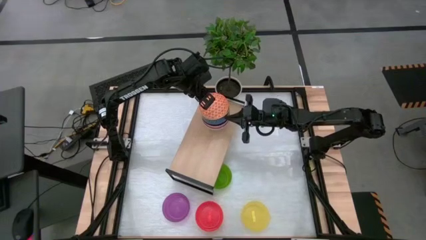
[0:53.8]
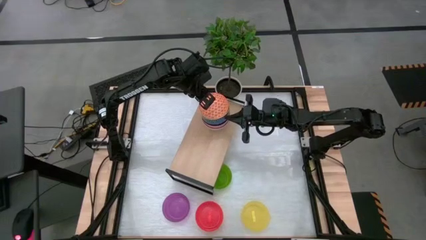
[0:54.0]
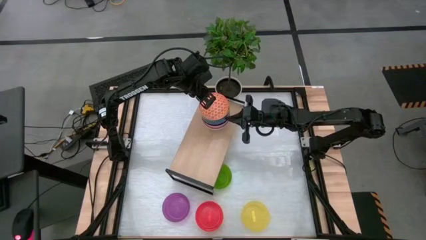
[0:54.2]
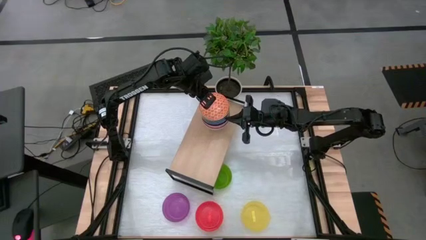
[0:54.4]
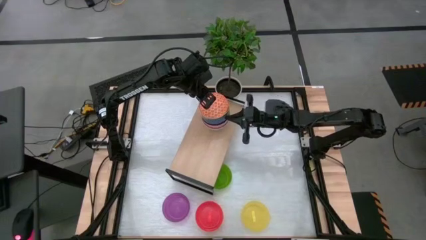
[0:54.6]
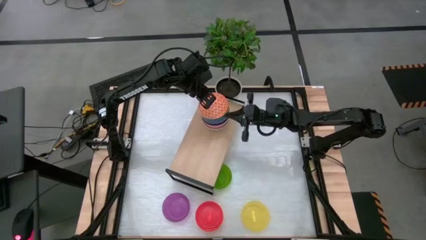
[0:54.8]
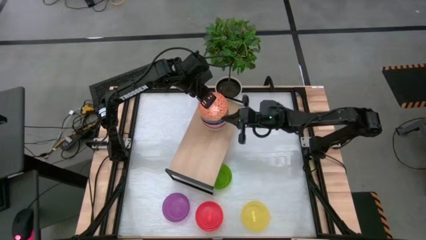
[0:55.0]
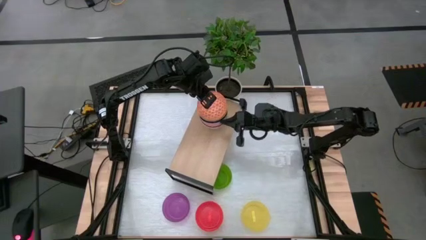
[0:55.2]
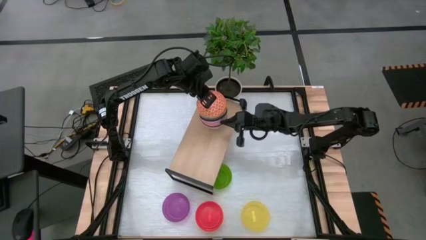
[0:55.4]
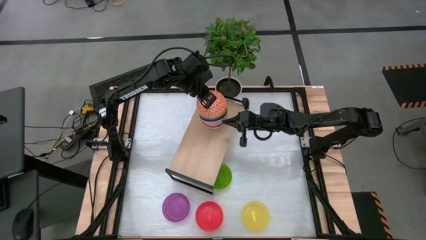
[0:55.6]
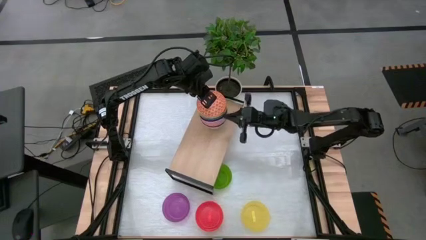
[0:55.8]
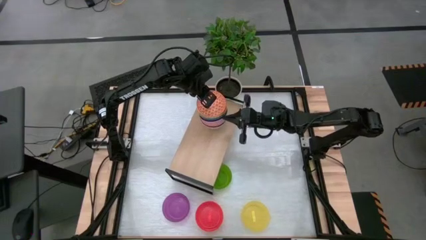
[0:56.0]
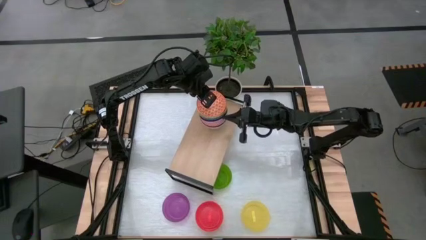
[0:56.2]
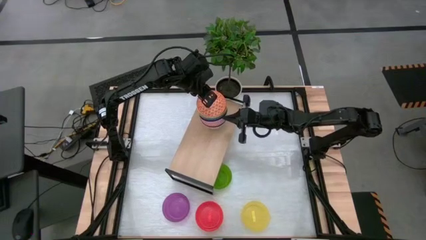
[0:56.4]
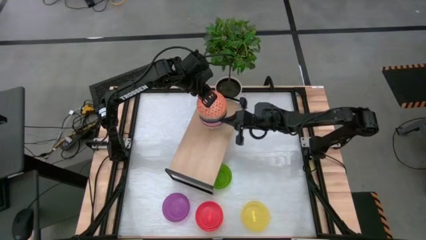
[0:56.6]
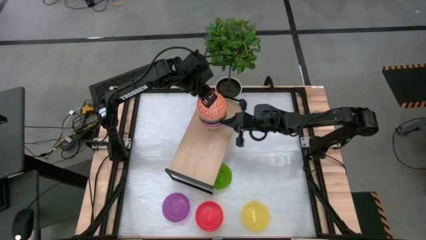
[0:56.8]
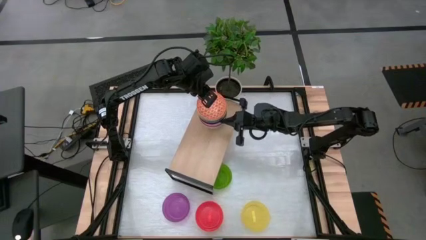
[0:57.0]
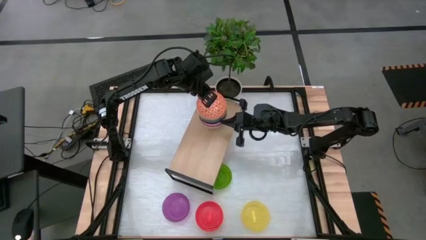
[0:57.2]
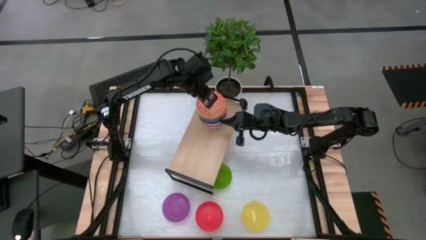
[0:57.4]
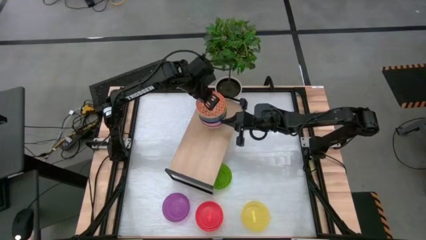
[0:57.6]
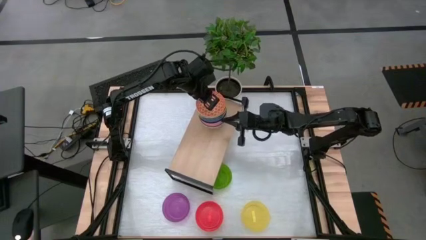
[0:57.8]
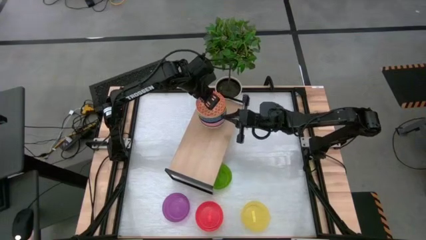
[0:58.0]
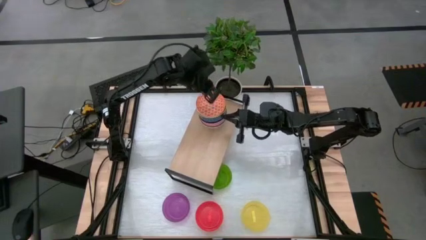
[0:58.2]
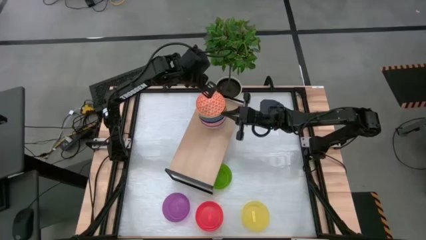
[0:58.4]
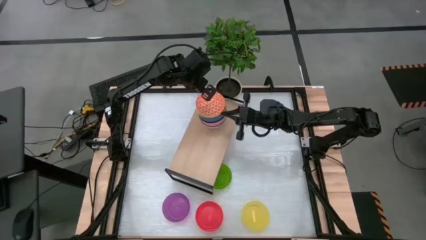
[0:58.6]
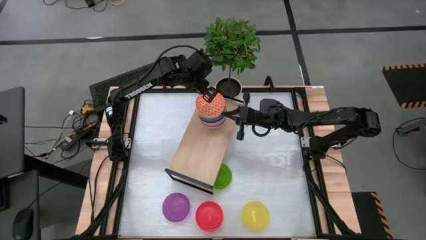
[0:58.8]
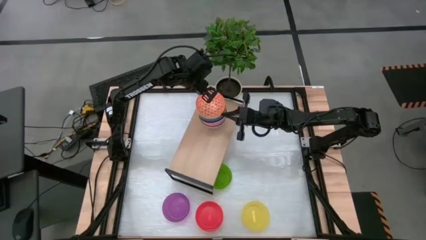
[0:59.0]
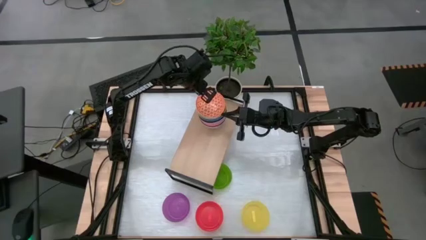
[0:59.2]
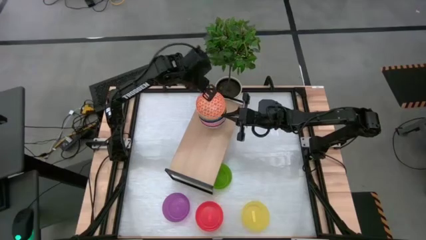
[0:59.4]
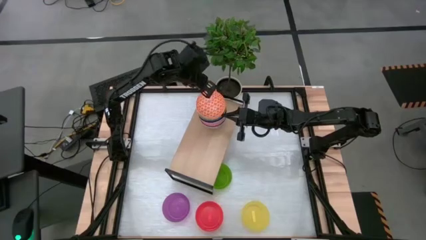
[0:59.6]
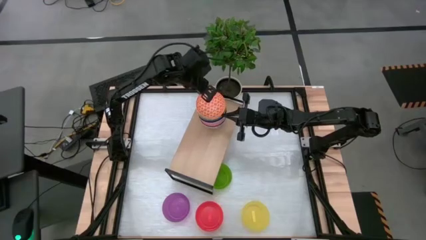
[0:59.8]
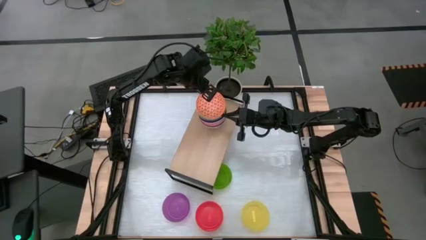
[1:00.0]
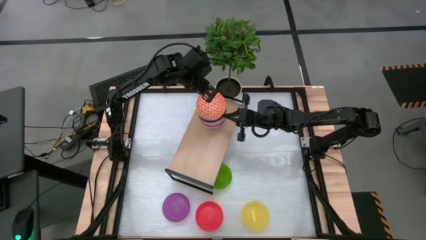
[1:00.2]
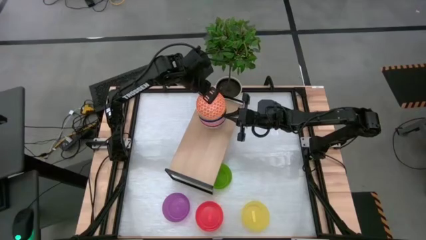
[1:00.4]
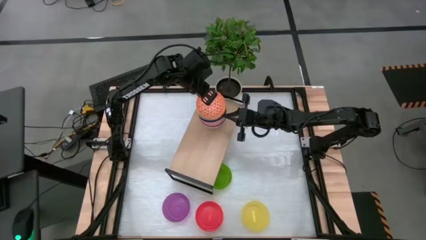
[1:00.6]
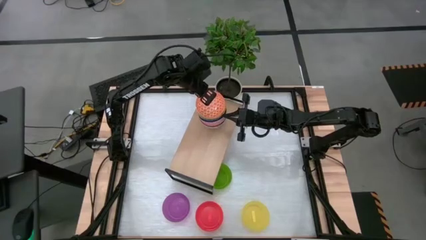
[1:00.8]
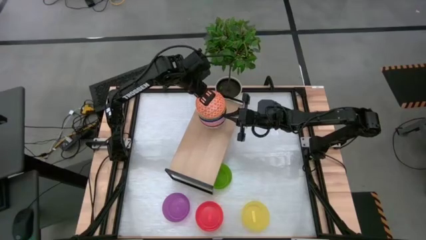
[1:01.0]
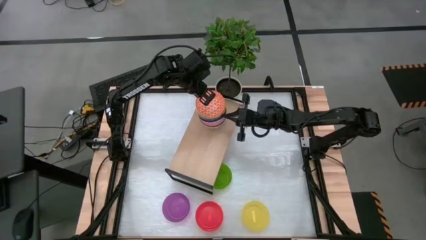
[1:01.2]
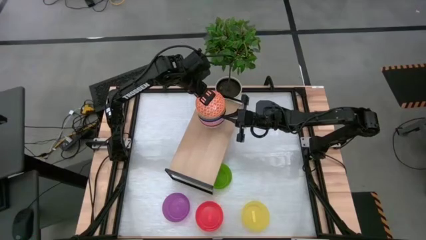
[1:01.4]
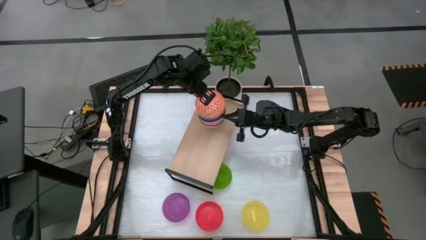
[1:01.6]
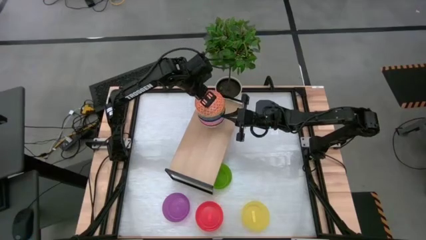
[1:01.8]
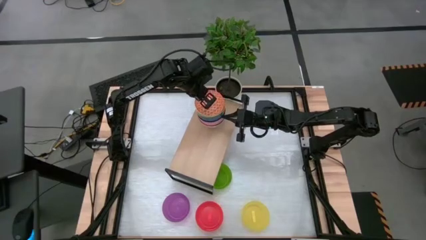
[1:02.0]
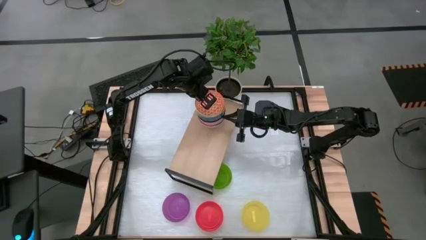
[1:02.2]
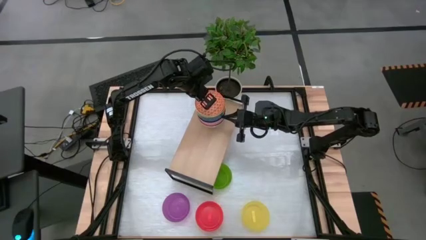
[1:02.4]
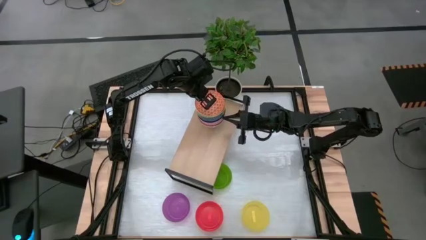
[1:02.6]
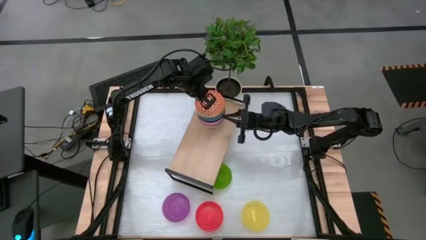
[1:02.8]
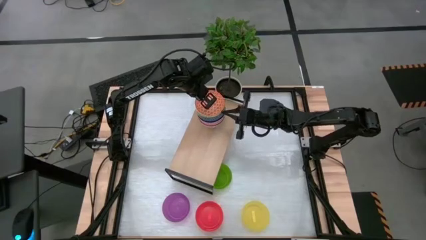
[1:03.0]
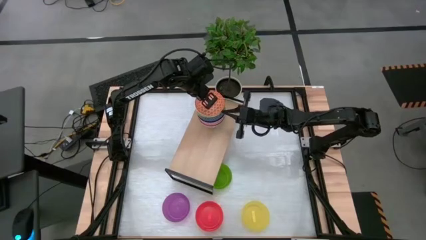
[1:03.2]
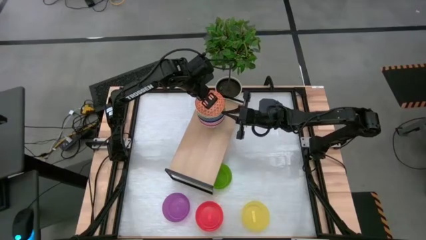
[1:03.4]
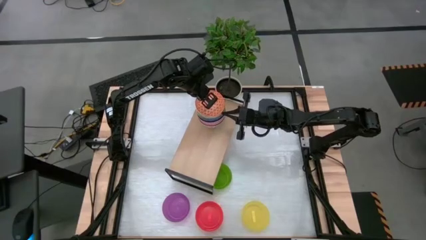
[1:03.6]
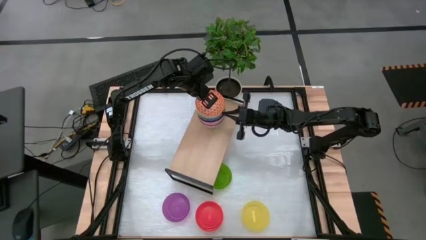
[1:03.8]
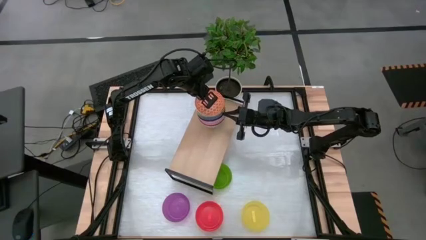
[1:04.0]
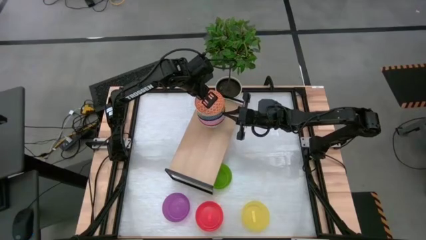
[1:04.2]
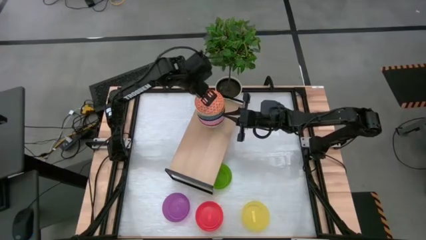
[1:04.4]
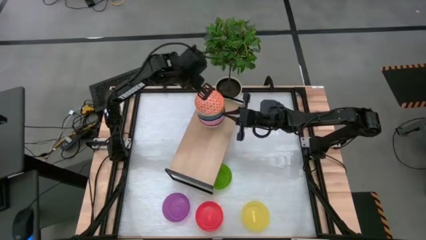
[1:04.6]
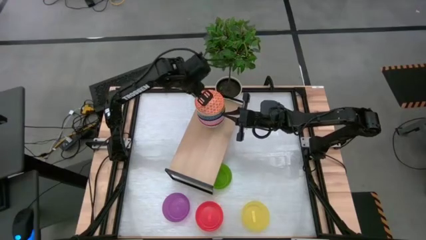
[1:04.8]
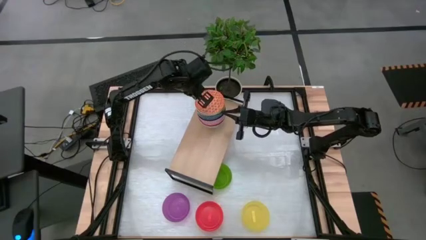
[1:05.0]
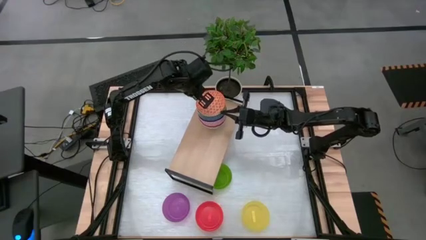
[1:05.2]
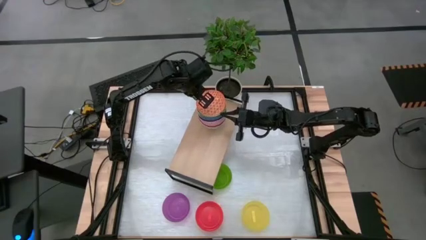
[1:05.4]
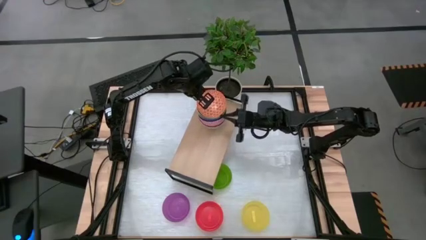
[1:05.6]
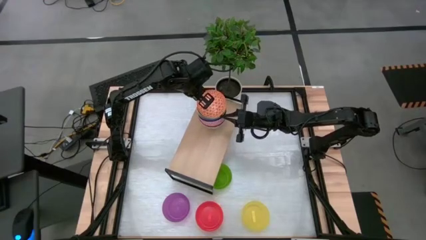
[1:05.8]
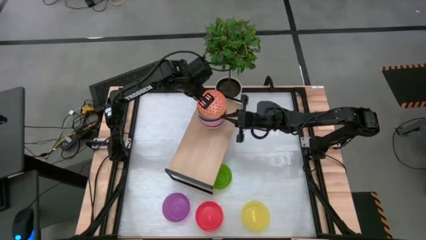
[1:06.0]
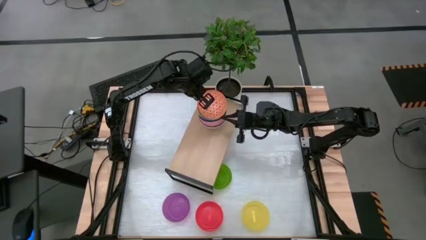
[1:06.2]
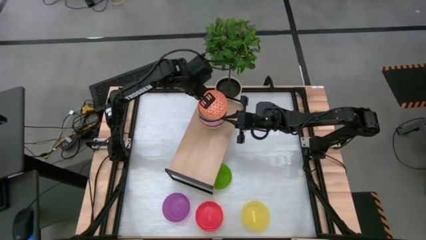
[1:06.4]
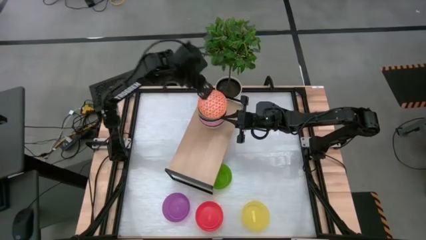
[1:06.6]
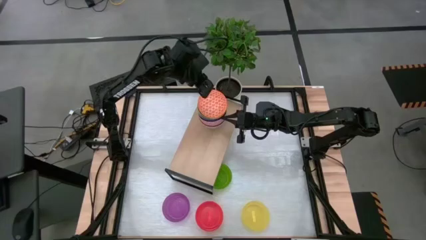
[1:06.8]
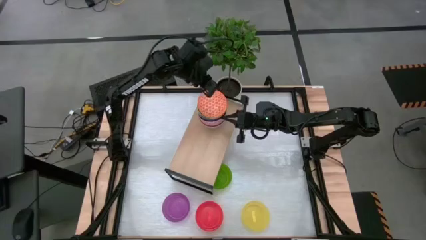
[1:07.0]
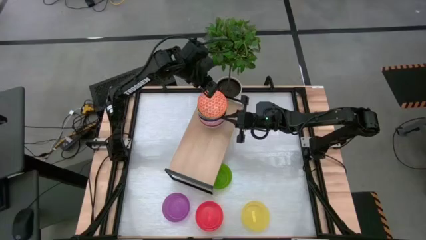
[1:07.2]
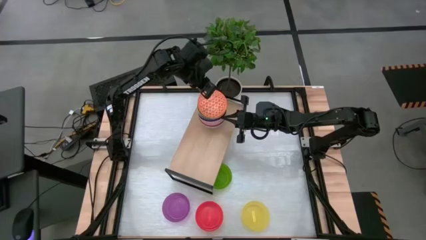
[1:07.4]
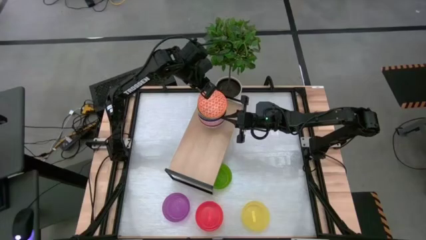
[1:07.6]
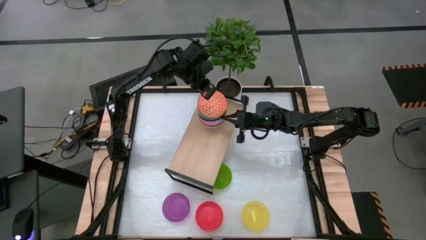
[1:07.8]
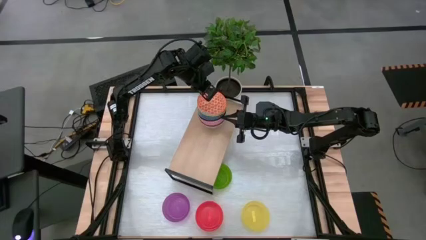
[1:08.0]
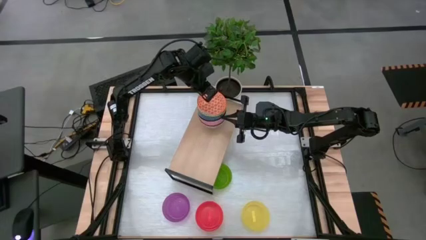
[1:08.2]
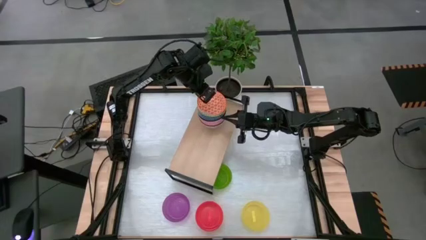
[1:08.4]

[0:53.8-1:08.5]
Task: Place and stack bowls onto a shelf
Stack the orange patterned bowl on top of the yellow patterned bowl on the shelf

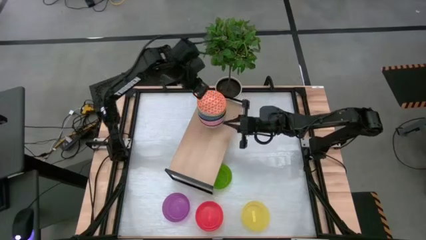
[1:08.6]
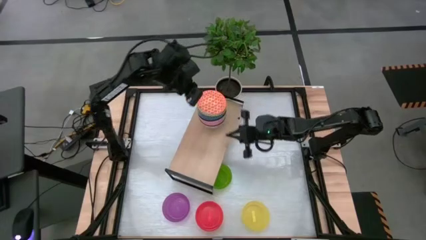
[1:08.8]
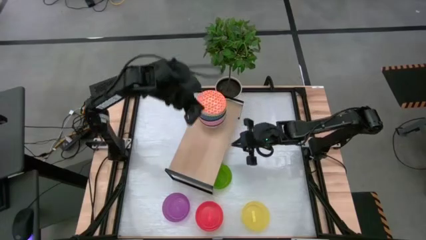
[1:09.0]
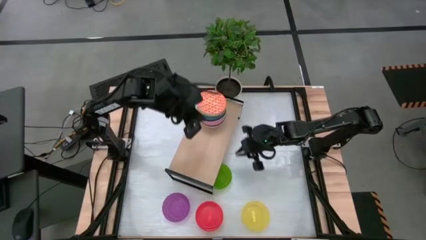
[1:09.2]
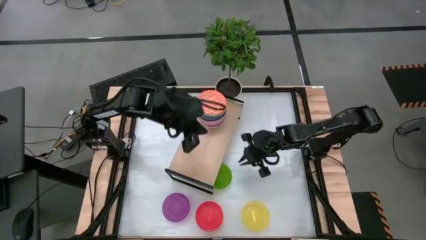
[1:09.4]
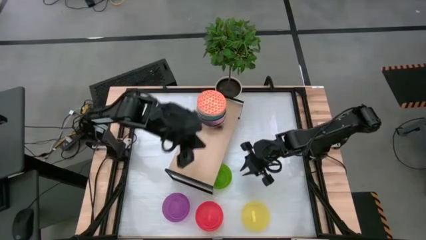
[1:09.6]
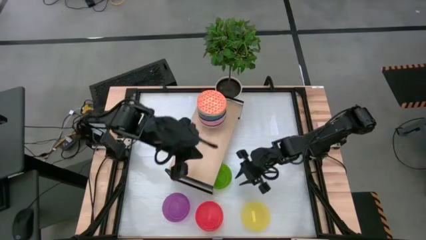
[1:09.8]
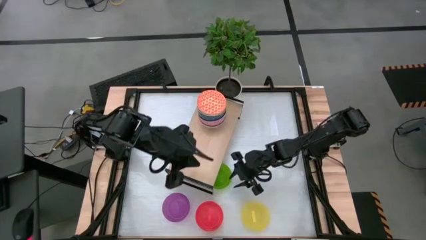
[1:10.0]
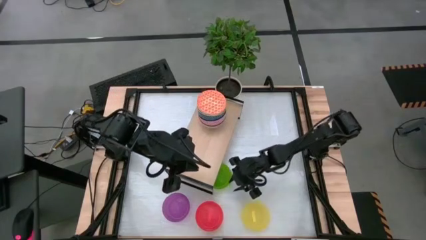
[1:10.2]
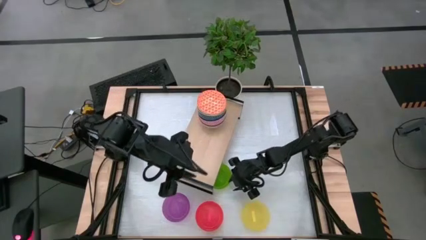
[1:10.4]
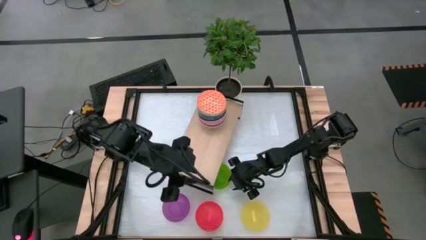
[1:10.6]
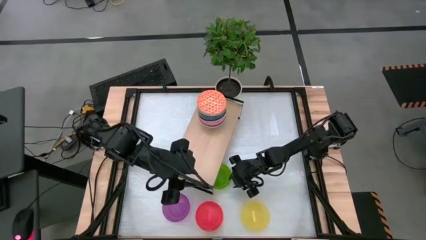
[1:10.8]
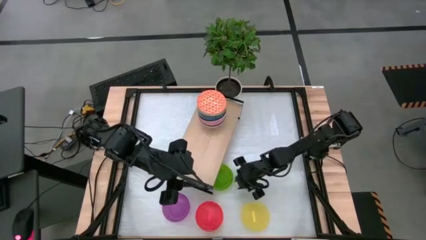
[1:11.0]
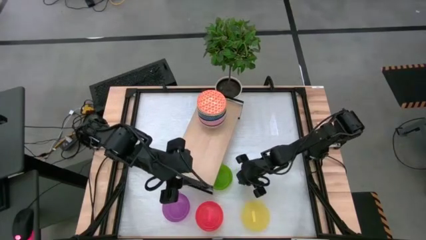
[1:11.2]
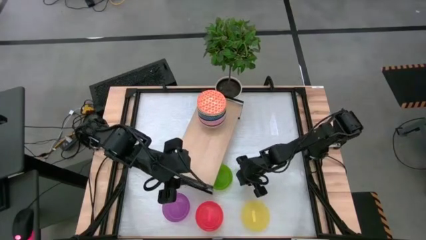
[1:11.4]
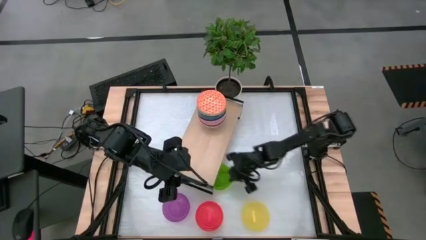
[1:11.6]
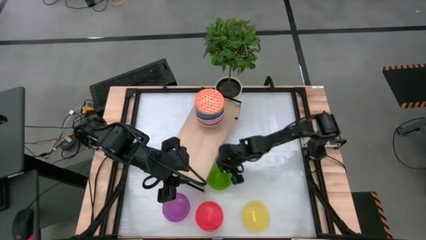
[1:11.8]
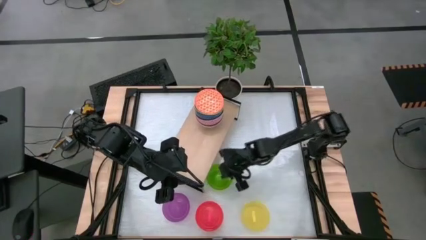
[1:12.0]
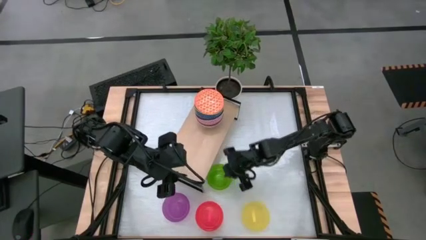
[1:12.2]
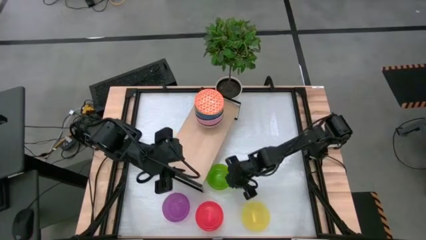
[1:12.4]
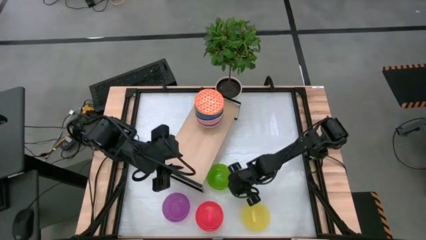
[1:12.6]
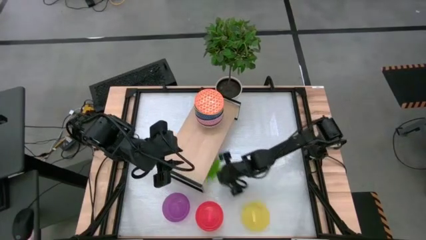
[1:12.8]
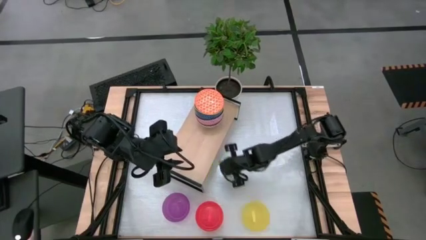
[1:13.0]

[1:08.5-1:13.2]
Put the green bowl on the shelf
